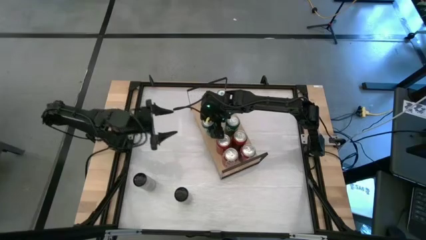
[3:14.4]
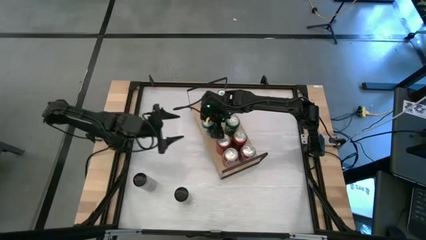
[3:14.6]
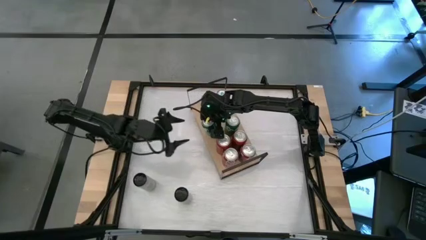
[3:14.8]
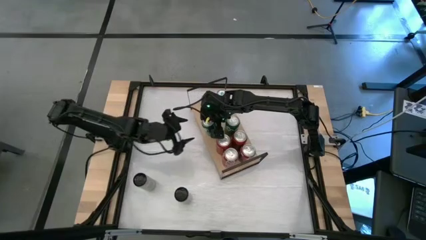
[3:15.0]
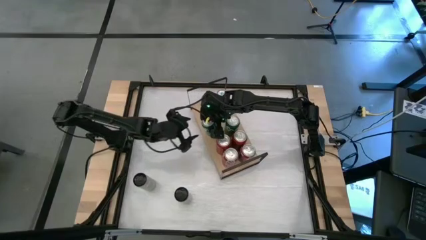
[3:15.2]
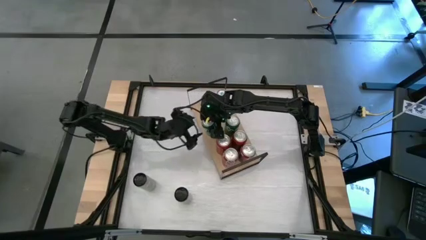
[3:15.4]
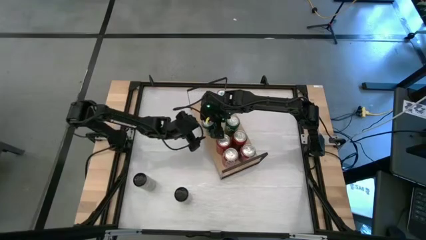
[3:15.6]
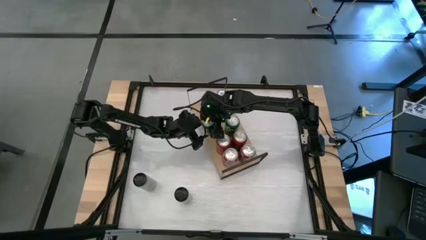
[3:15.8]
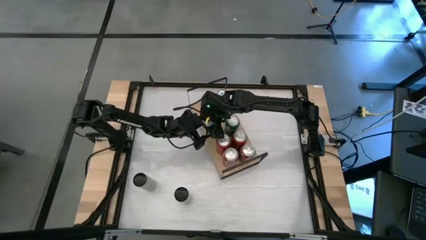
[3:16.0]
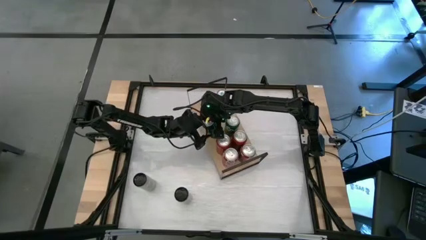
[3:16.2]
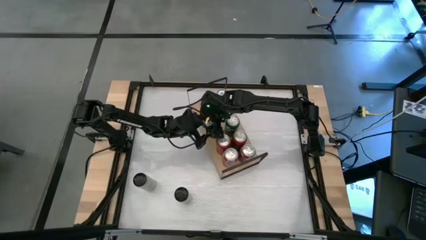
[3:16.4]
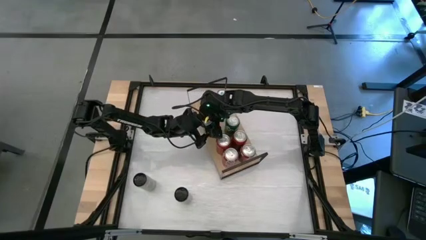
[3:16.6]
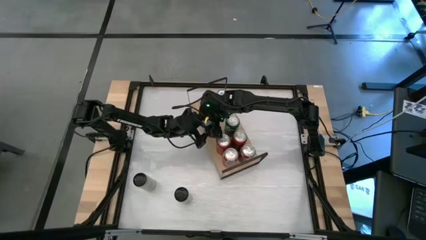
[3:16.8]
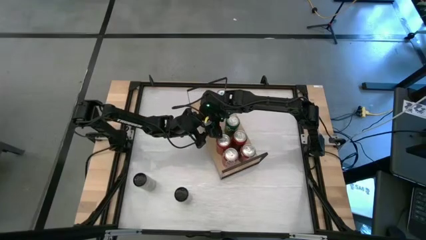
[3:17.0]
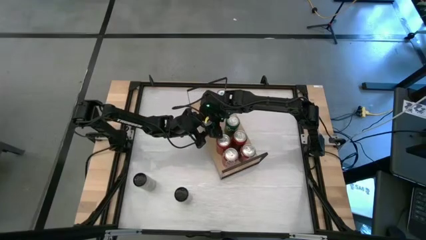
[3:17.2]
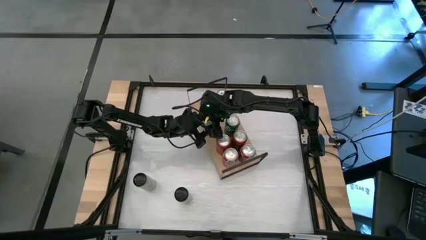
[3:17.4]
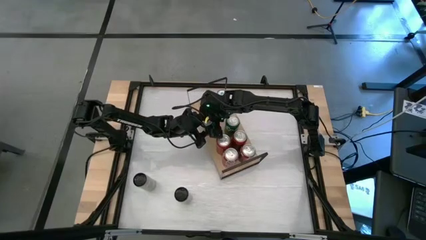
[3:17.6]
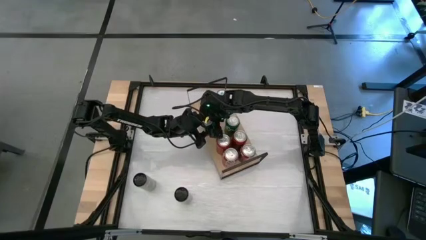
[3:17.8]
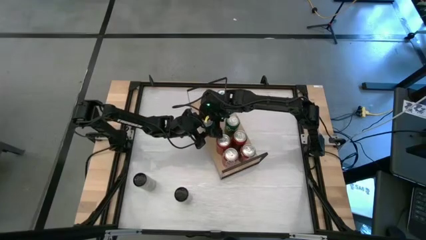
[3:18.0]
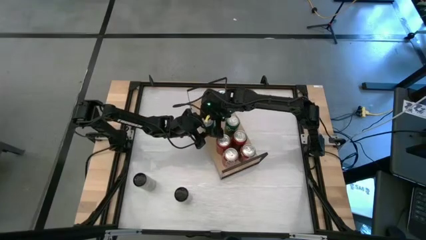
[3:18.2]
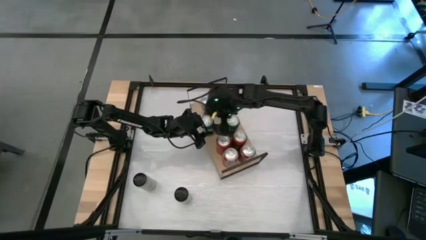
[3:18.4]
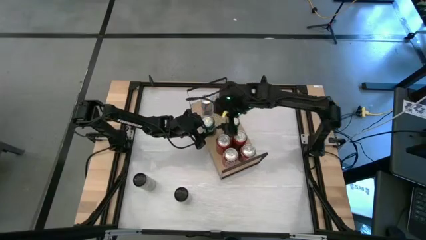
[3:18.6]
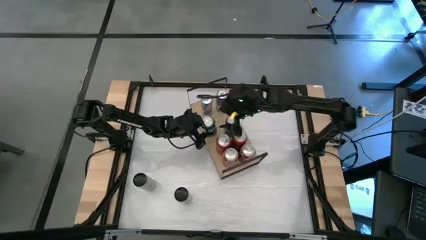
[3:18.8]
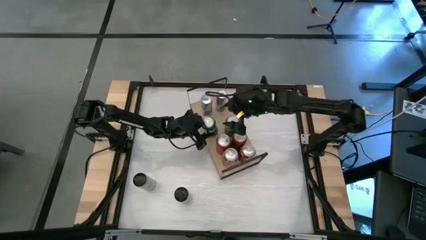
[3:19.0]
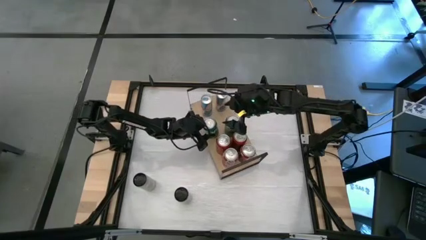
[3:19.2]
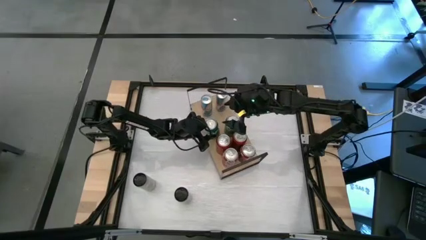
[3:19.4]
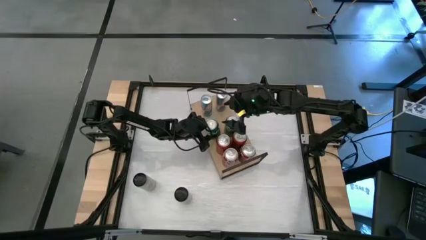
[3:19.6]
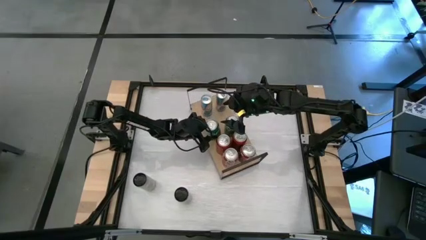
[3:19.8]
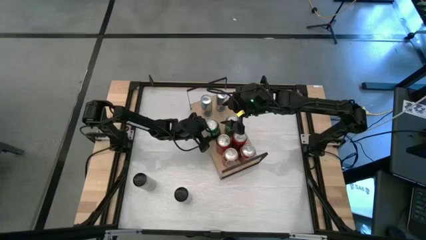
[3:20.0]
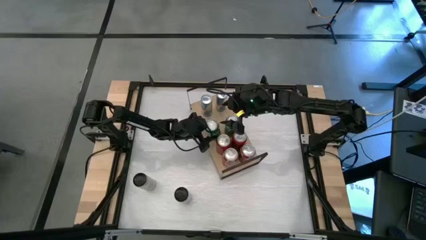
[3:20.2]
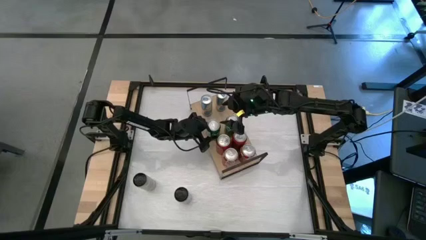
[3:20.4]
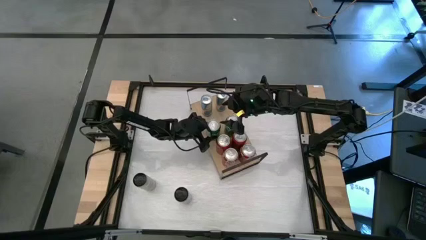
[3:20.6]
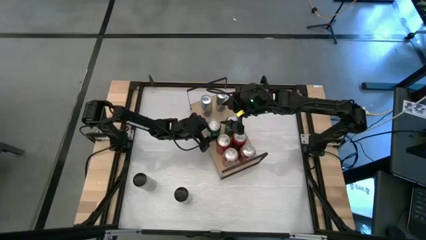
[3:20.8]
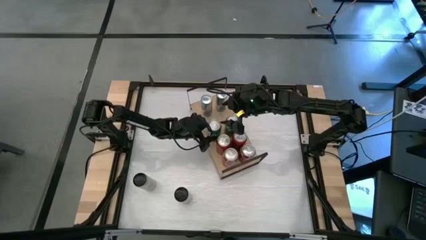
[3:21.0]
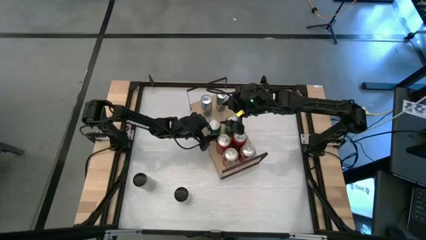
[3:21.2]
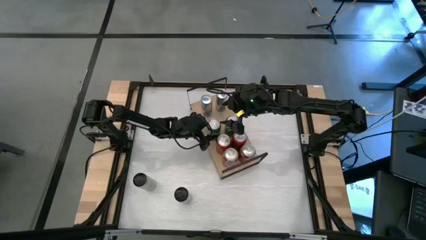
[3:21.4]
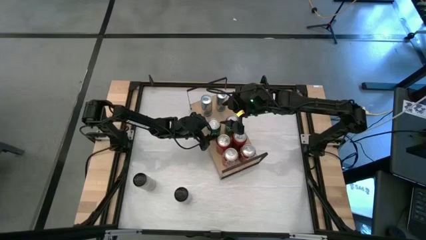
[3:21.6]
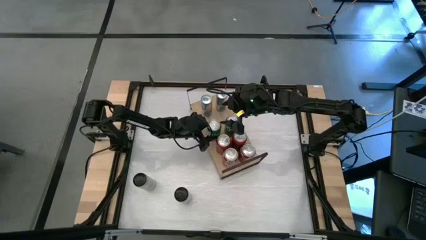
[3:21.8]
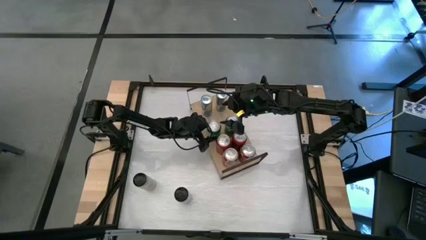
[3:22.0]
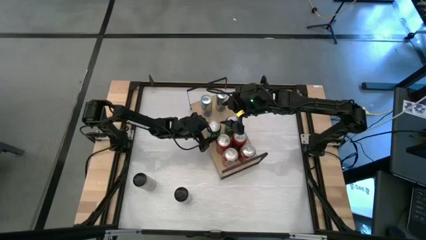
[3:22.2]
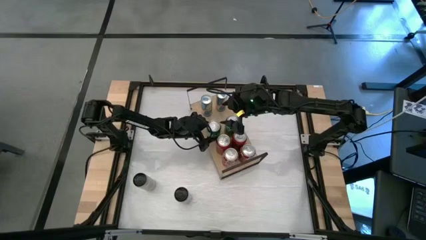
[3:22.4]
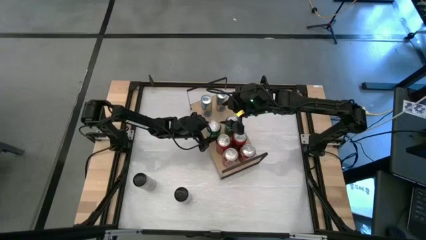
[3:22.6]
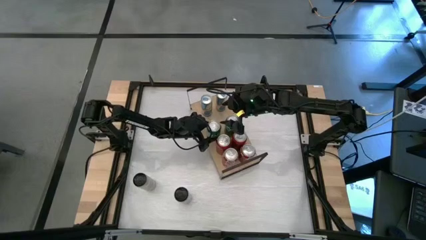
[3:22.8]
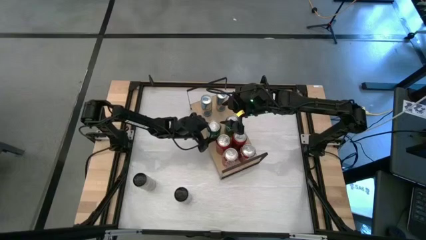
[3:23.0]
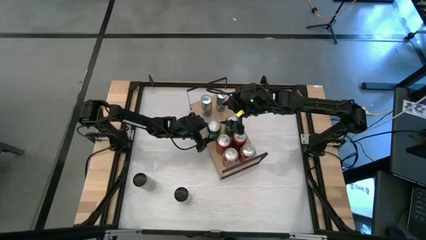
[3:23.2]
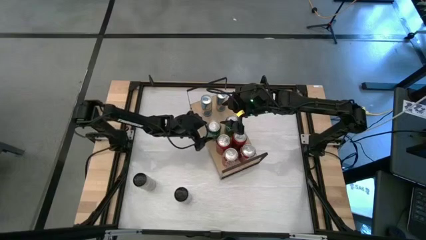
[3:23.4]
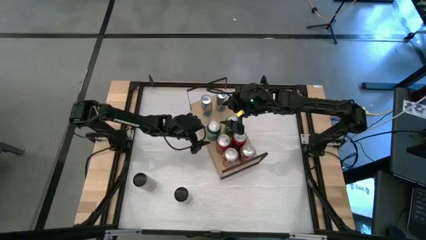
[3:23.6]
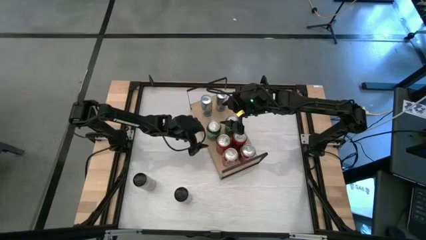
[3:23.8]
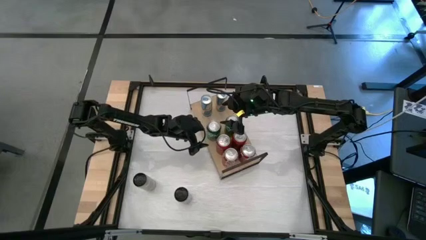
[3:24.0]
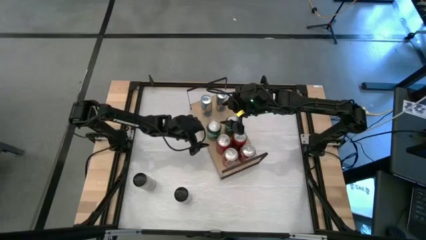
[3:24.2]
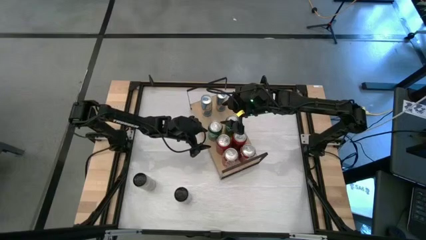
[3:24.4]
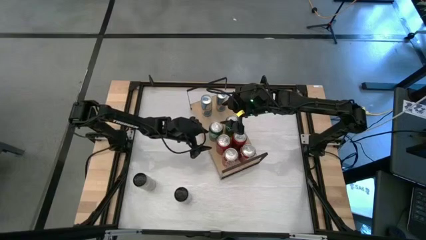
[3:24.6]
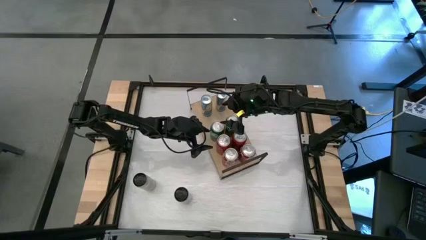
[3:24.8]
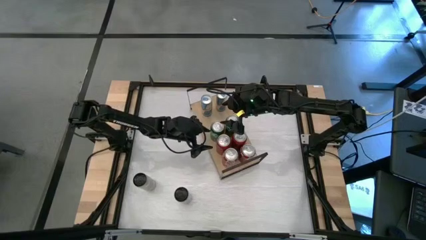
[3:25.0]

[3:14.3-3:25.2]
Task: Place canned beverage on shelf
Put the green soda can on the shelf aligned with the other green soda can

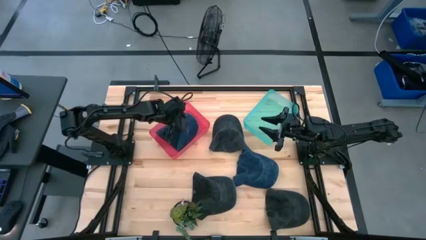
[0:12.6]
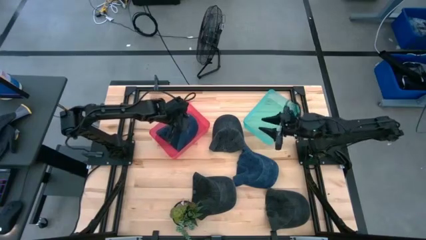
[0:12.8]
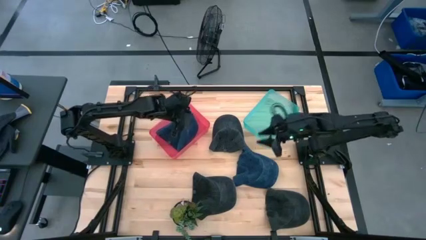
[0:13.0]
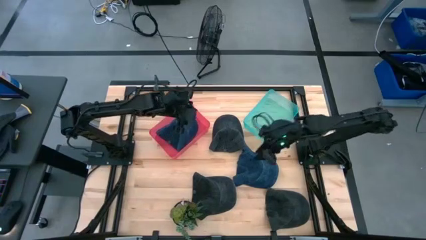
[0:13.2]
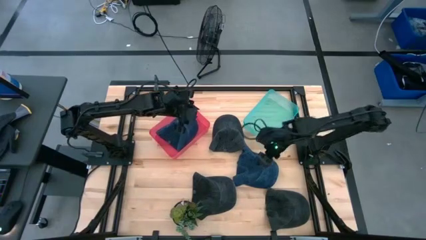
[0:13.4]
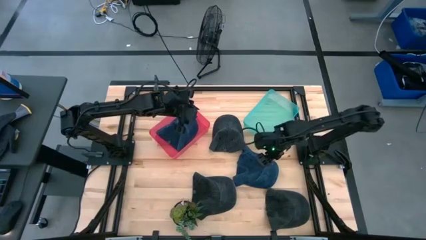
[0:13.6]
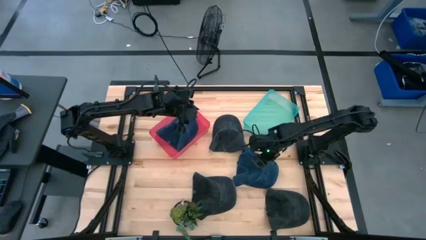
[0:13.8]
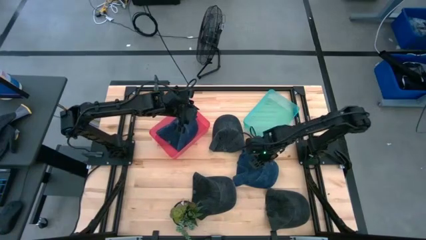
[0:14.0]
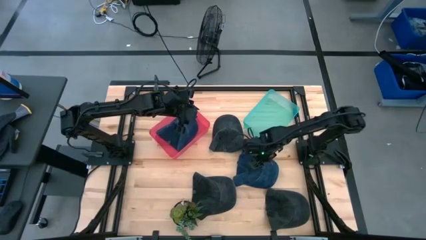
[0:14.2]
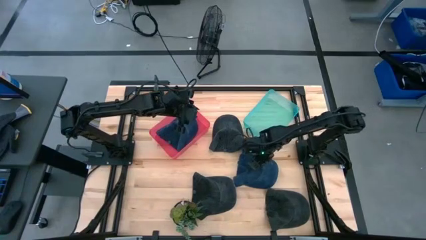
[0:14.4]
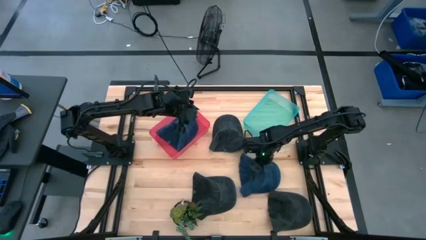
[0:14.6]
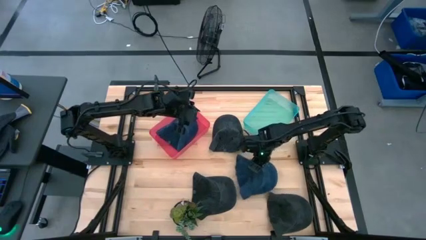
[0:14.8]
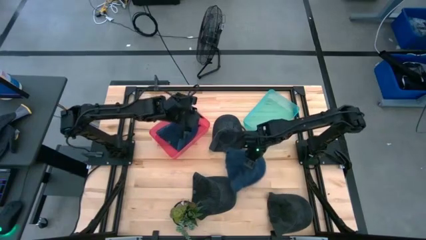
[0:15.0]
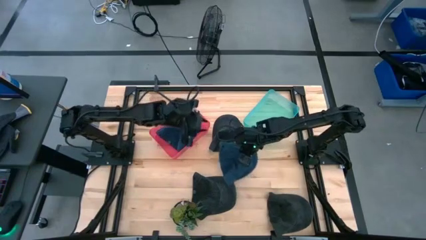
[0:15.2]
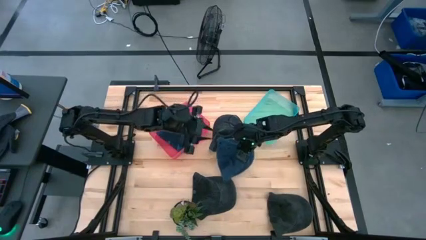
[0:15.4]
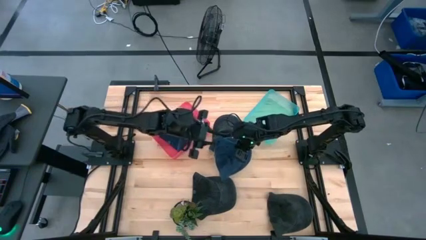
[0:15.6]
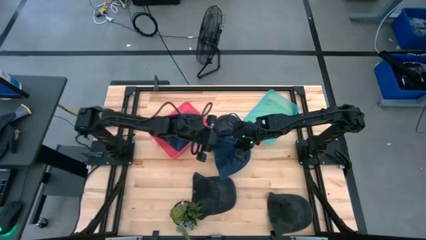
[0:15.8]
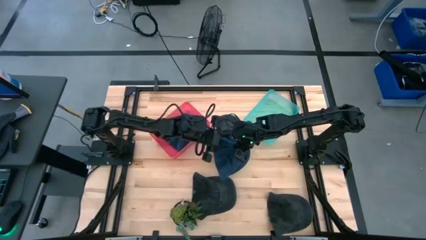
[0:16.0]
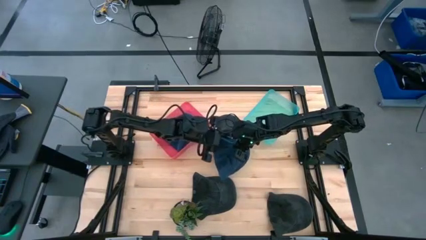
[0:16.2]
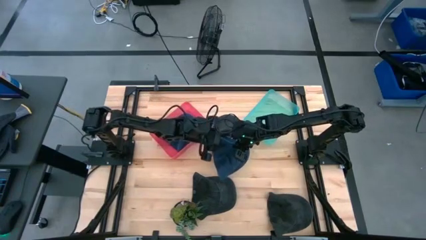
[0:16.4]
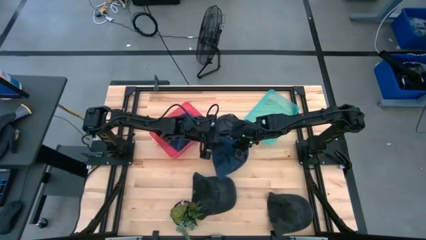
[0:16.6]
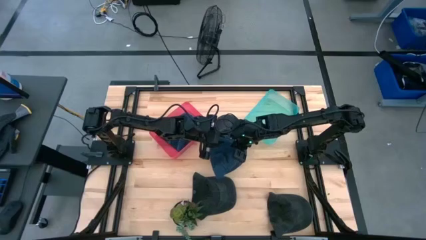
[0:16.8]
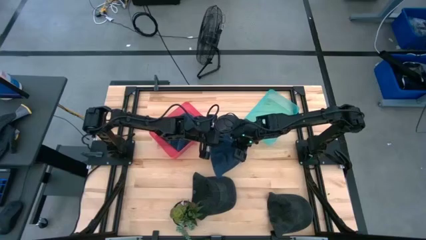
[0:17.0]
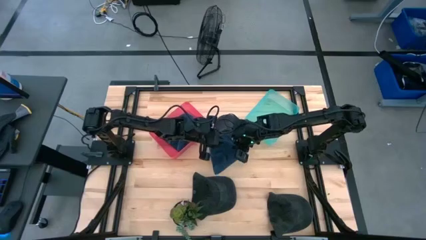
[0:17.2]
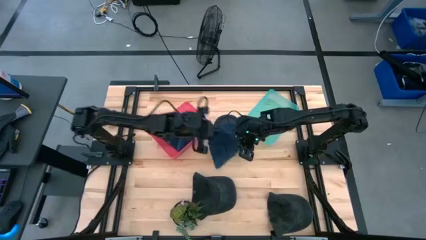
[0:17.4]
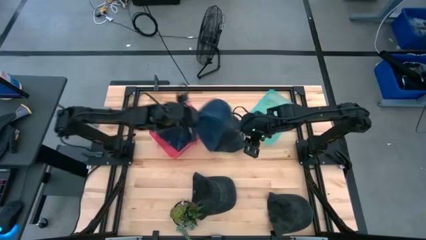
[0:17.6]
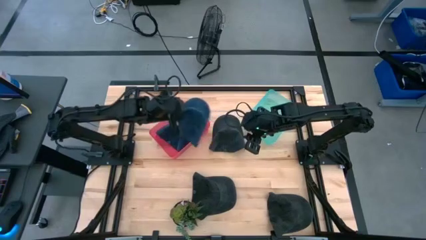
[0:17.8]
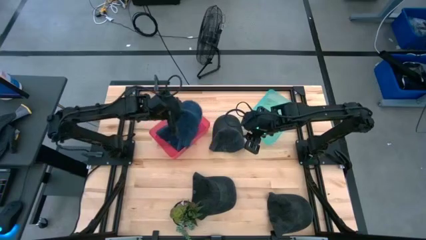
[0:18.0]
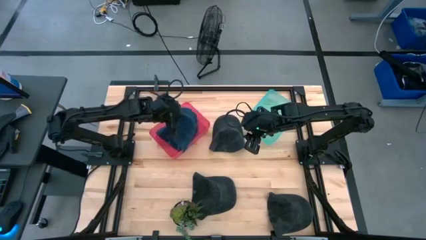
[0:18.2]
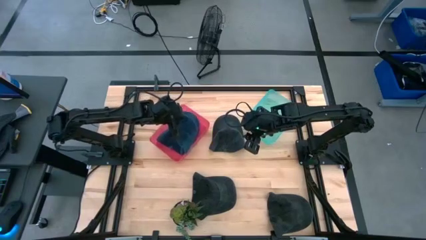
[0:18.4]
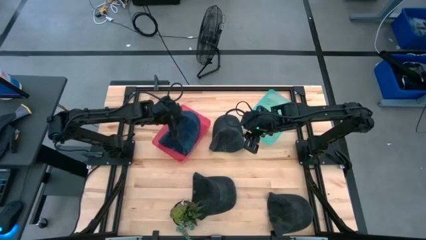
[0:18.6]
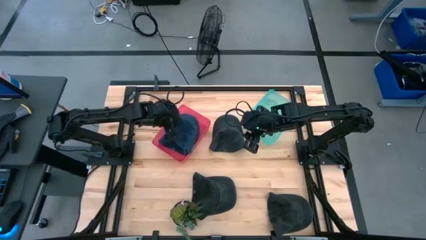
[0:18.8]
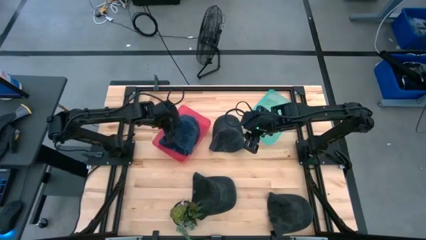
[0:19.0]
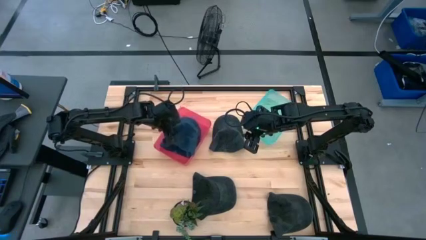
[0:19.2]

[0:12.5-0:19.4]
Task: Pick & Place hat
Put the blue cap into the pink bin
